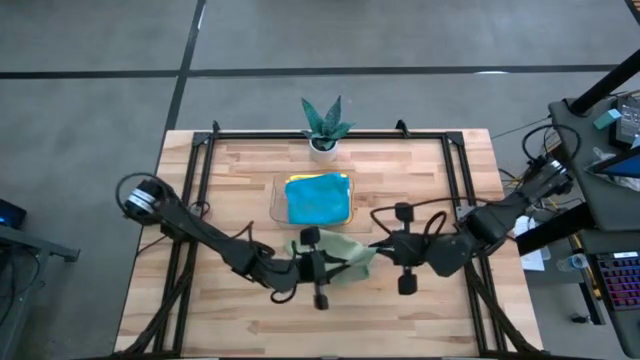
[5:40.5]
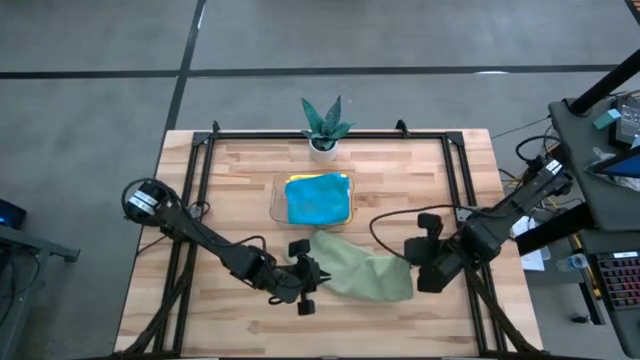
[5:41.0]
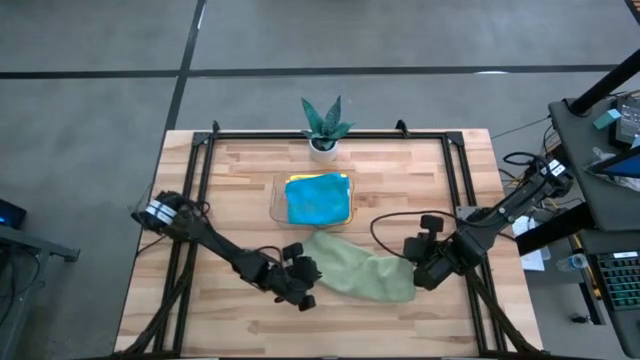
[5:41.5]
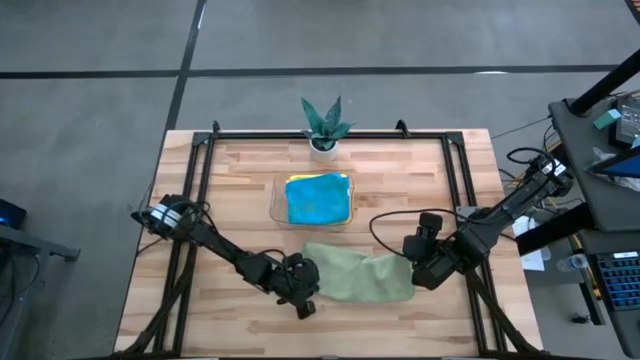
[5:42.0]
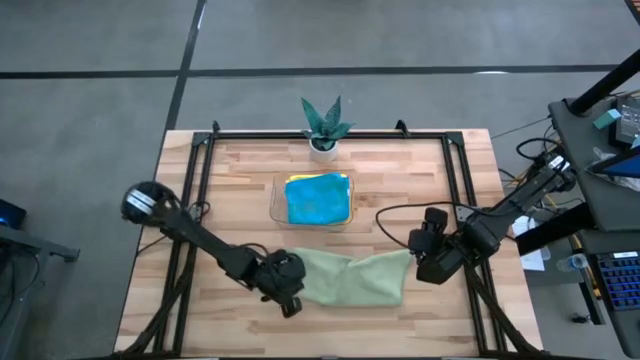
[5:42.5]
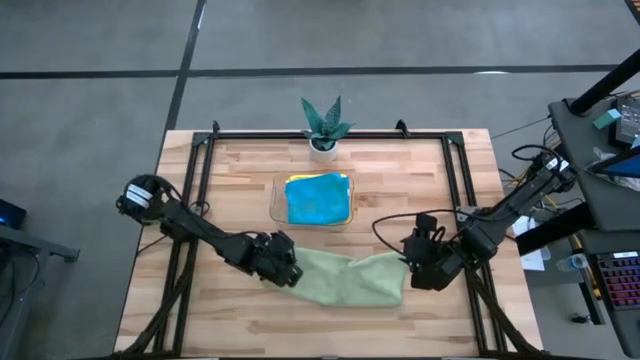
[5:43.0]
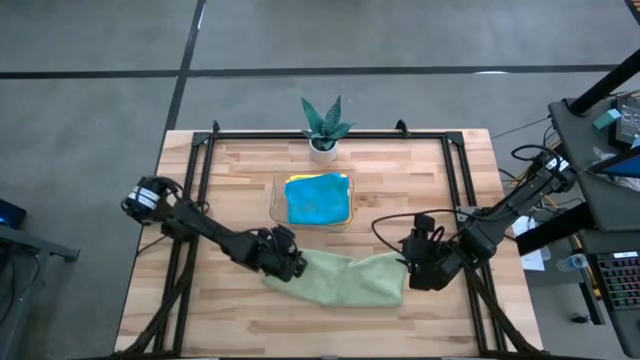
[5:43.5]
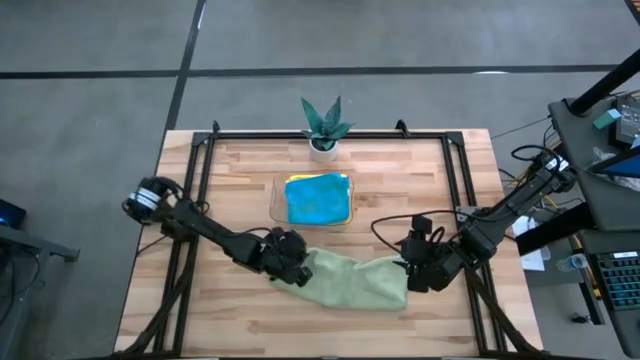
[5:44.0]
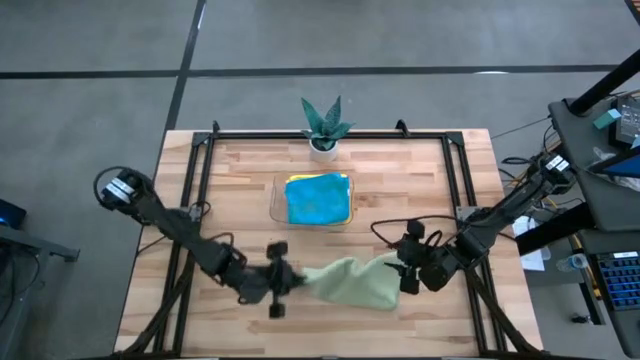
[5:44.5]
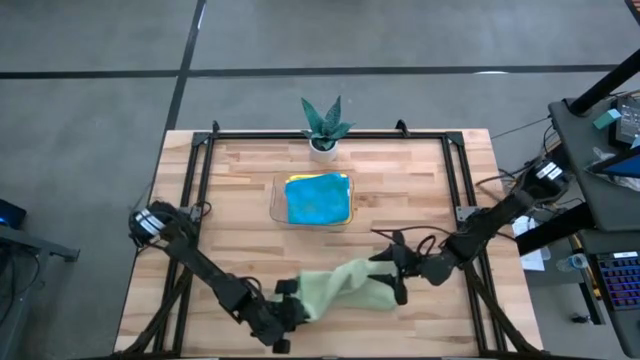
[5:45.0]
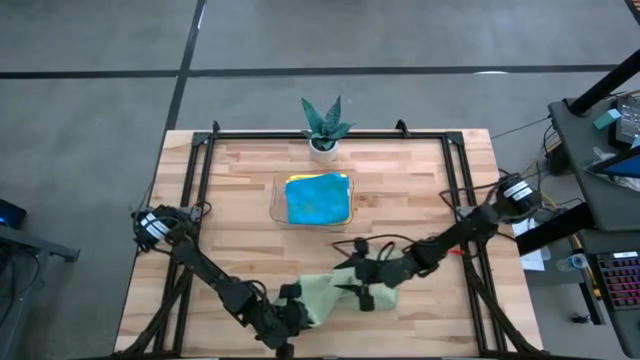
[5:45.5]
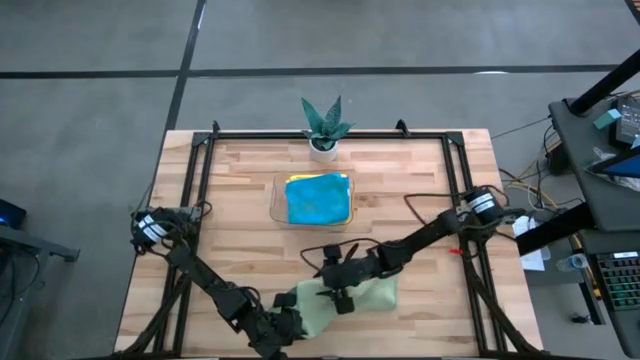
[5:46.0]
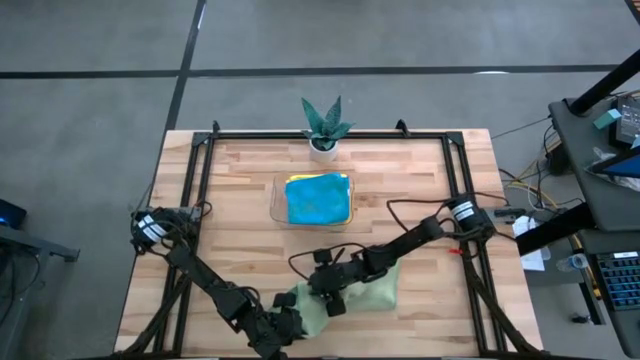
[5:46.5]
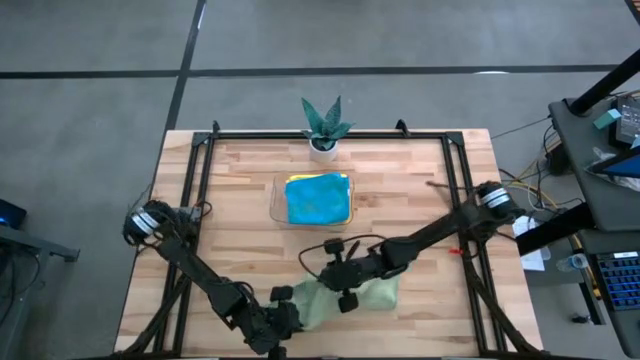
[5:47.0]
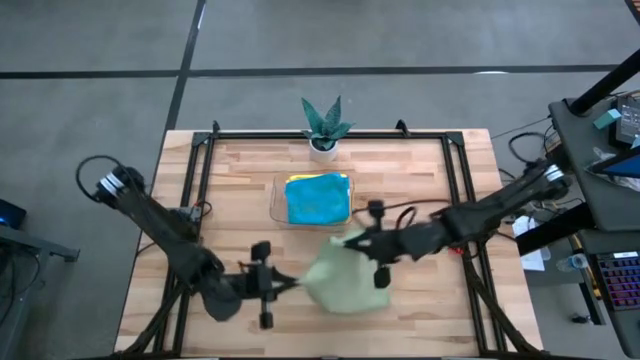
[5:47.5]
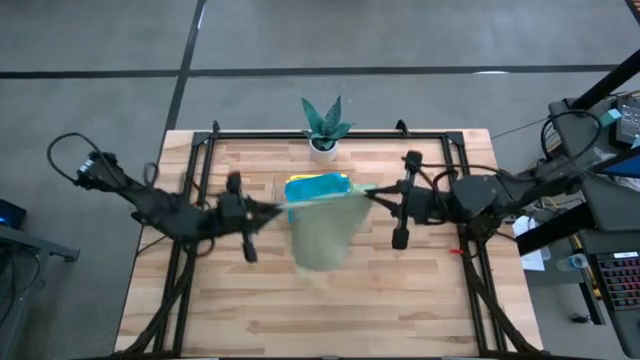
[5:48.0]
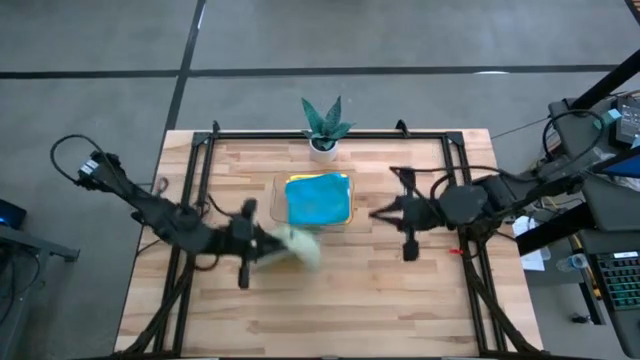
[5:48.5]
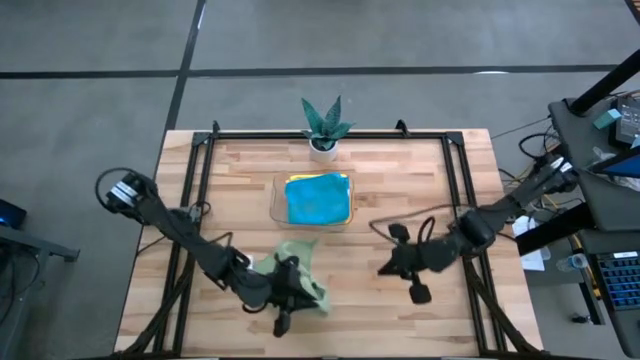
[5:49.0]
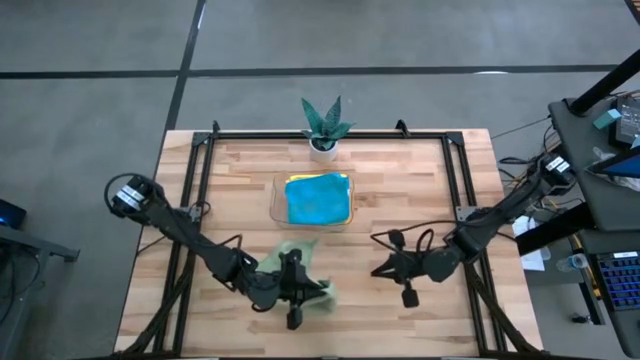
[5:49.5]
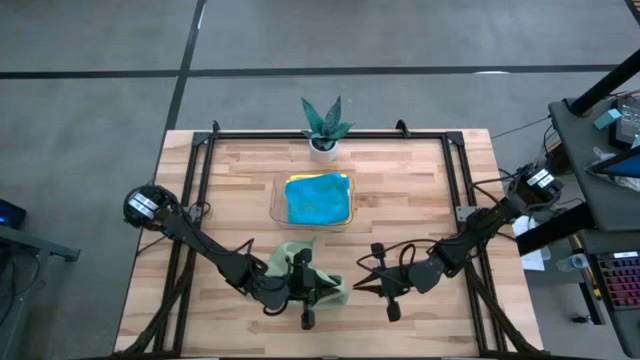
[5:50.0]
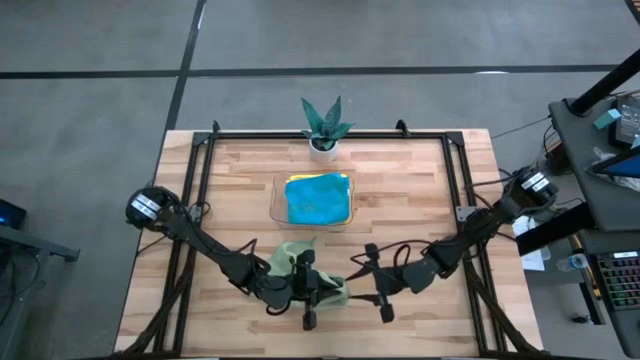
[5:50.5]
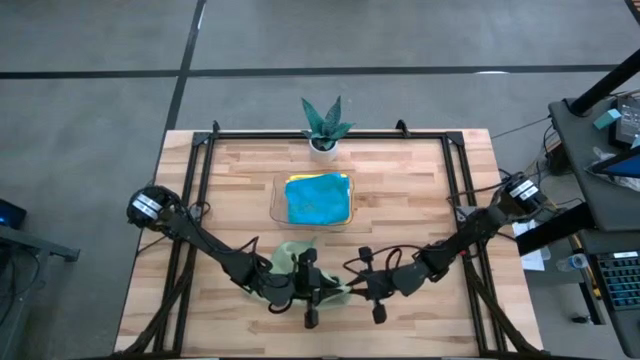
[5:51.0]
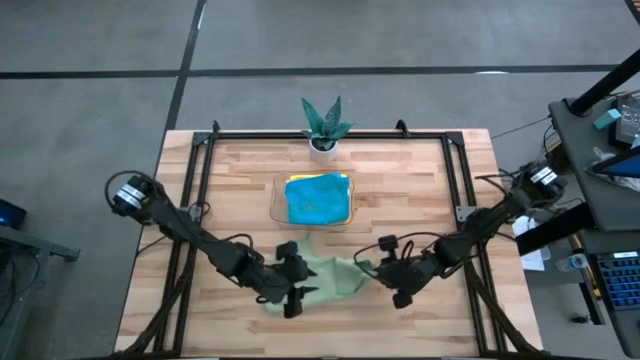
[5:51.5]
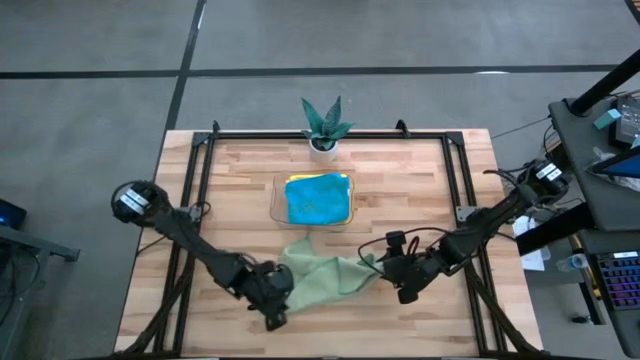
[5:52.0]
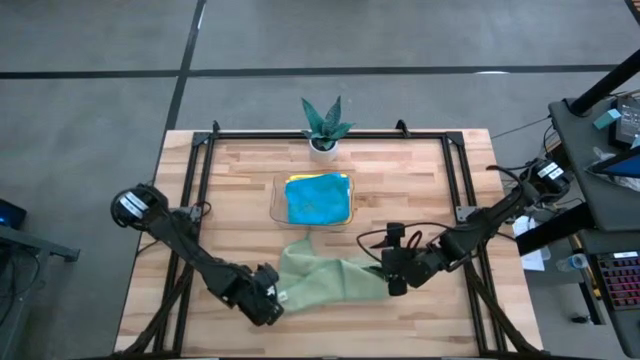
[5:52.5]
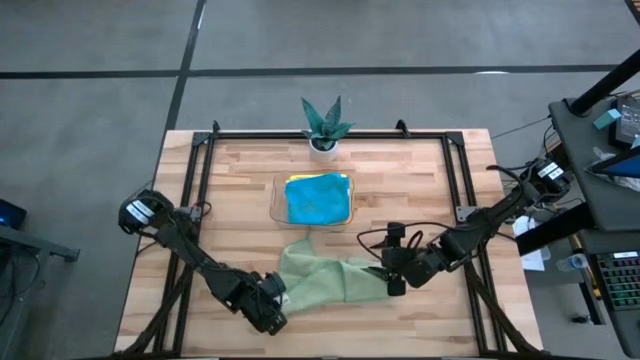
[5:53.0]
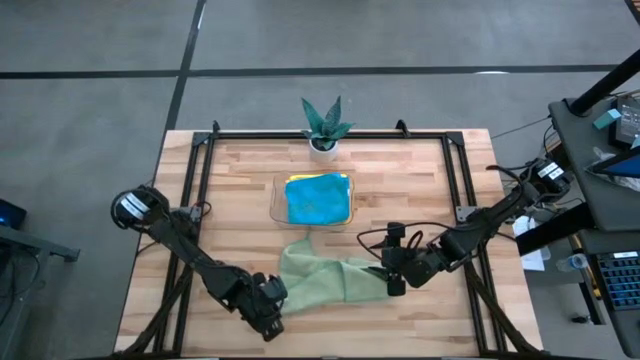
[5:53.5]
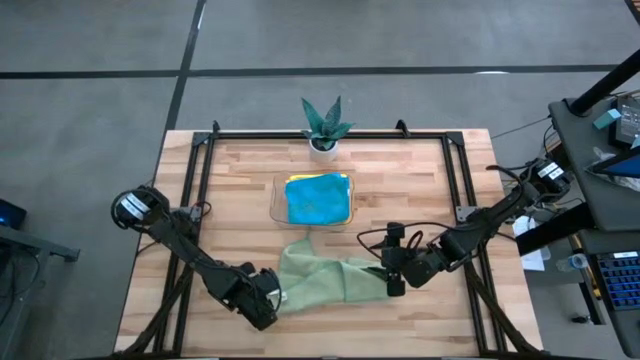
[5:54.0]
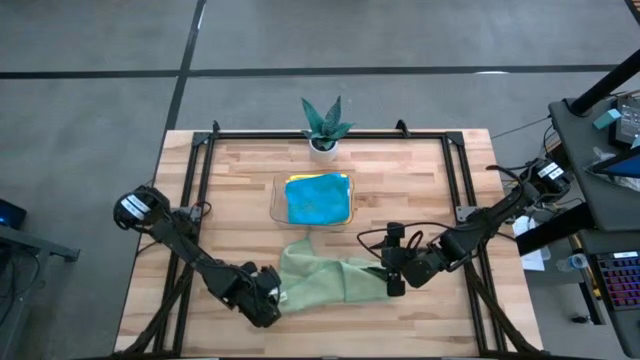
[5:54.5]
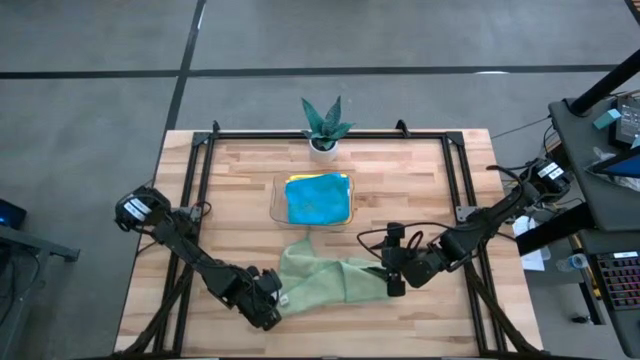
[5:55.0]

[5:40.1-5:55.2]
Task: Fold microfiber towels
Fold the green microfiber towel
